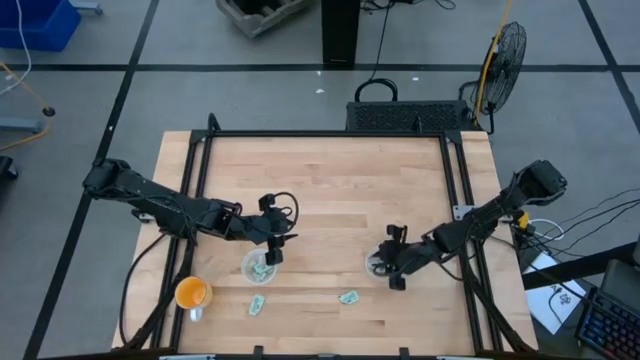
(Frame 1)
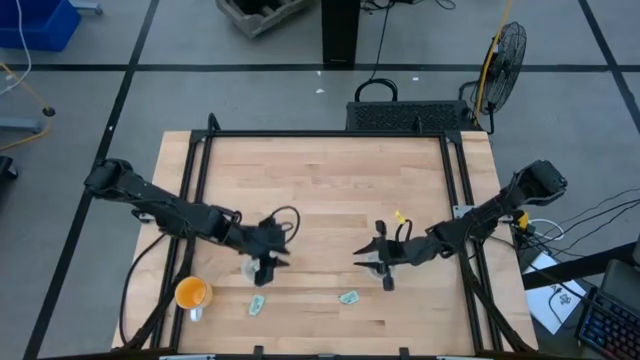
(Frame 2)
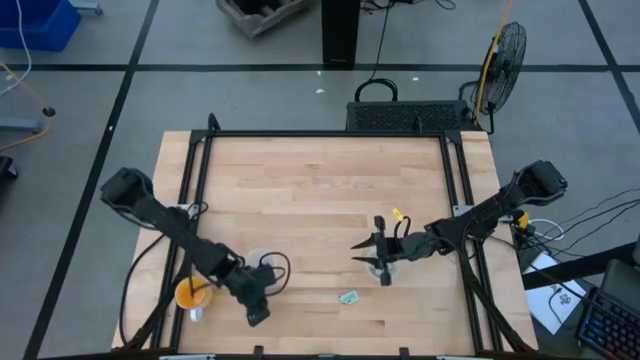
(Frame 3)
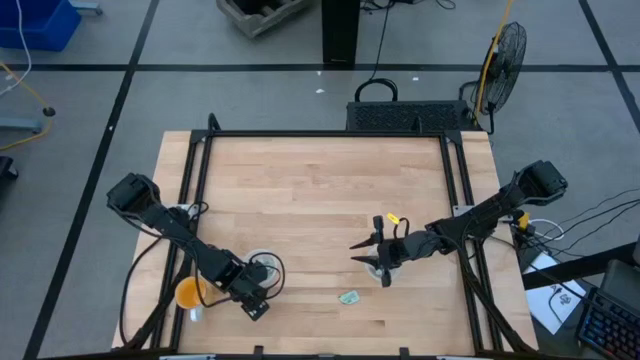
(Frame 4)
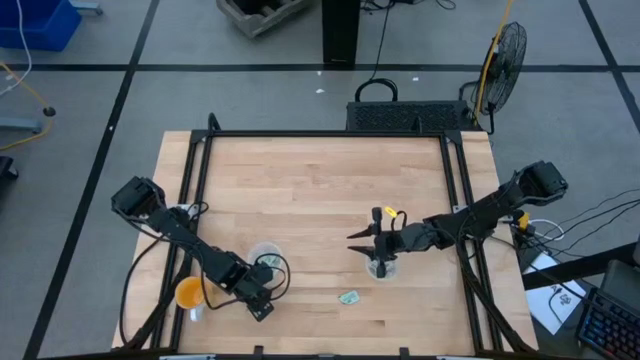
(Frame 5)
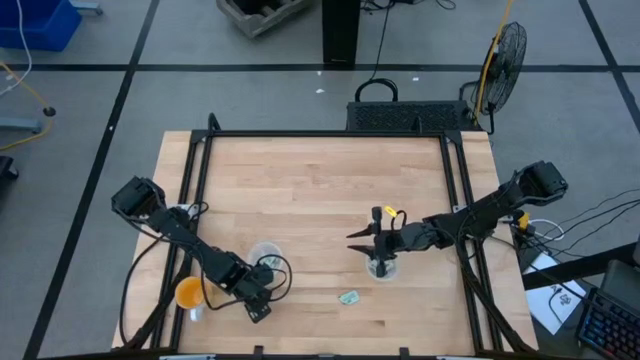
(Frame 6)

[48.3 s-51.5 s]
Task: Pick and place Stevia / Truvia into bins
Put the left light green stevia packet into the left transparent container

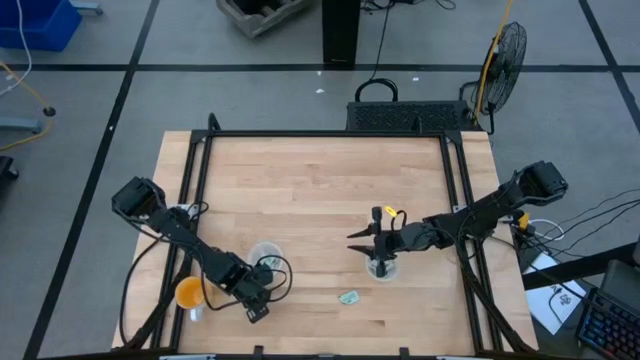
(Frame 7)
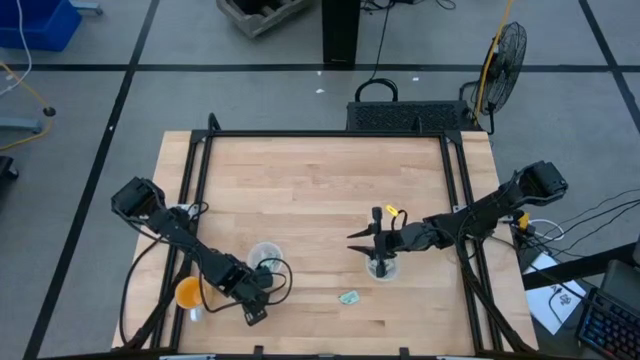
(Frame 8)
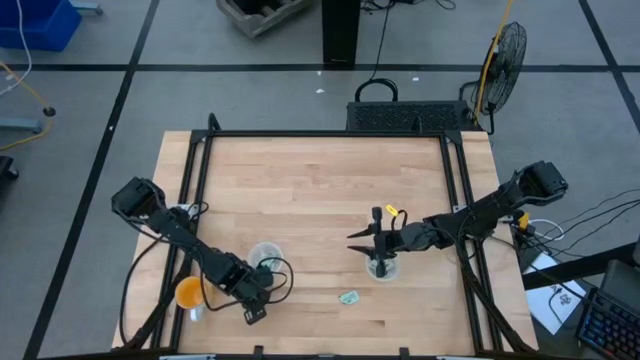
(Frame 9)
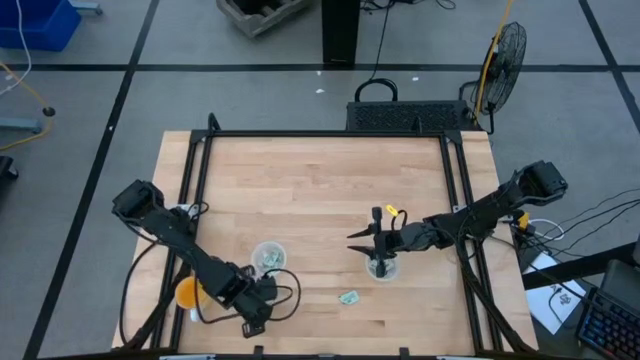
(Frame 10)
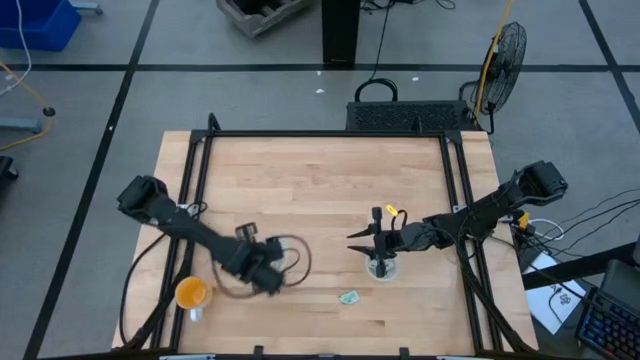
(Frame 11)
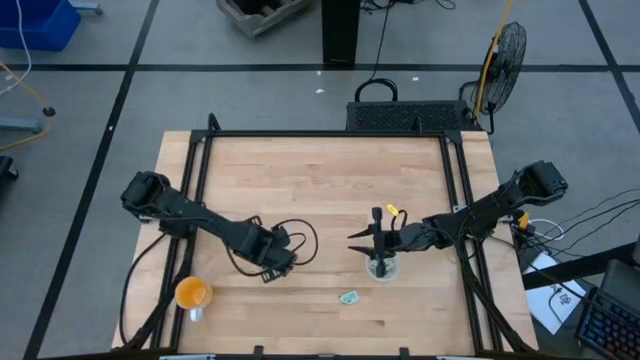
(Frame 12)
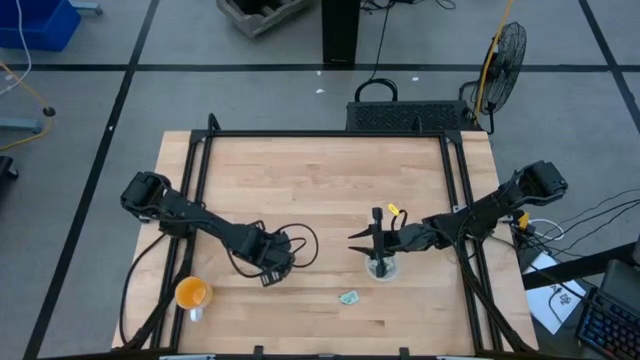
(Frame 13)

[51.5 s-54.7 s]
Put the left light green stevia packet into the left transparent container

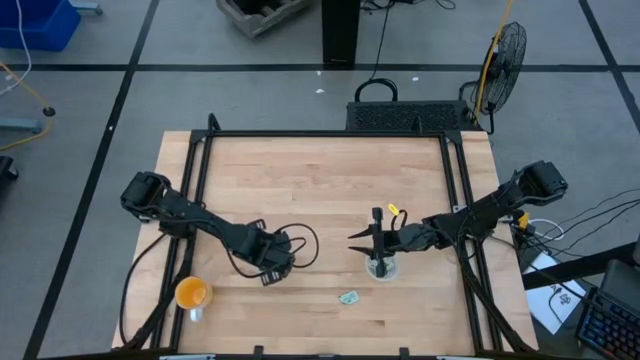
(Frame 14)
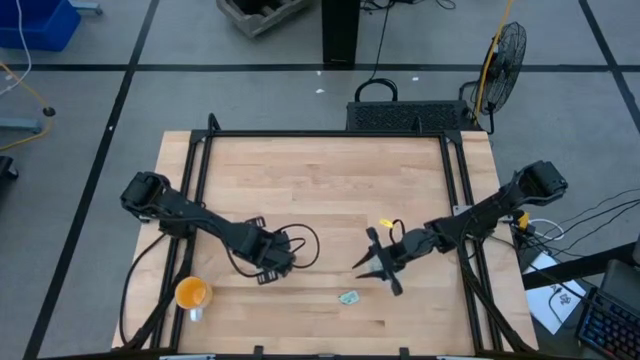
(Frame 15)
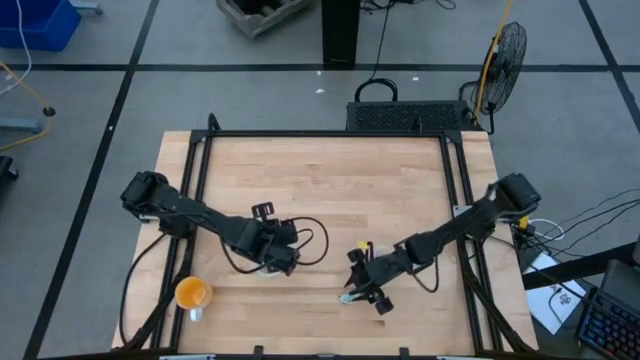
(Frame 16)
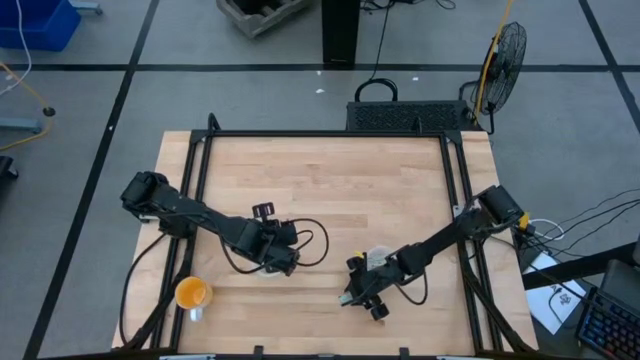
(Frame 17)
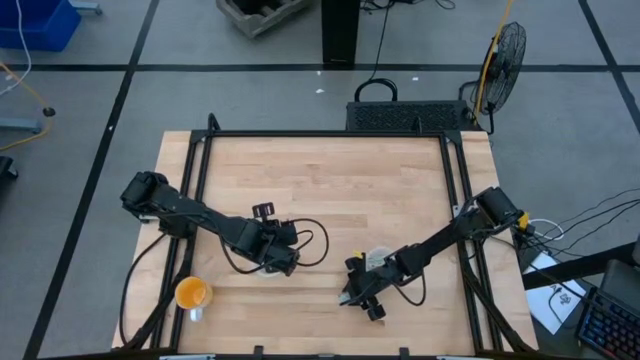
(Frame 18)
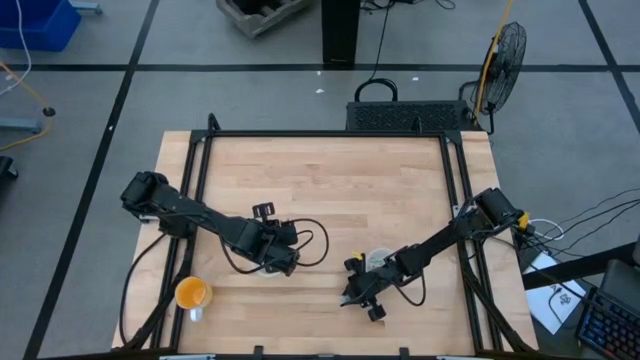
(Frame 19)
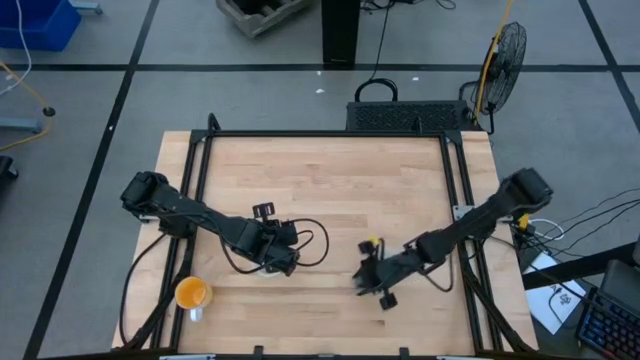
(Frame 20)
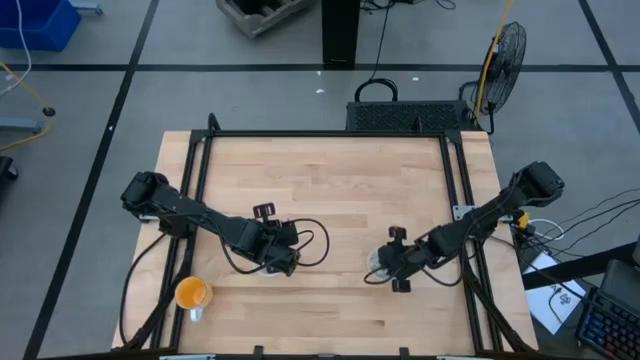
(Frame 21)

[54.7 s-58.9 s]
Put the light green stevia packet into the right transparent container

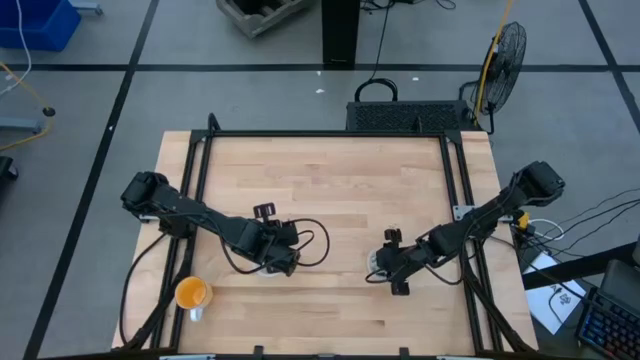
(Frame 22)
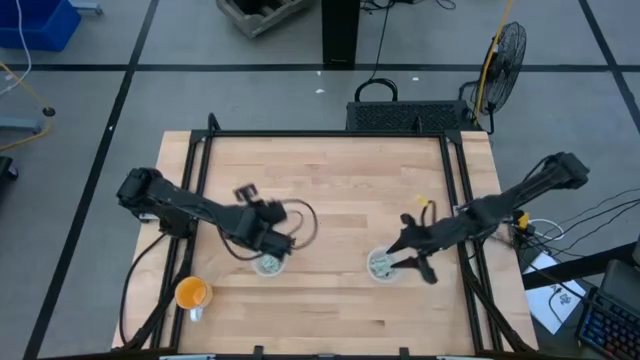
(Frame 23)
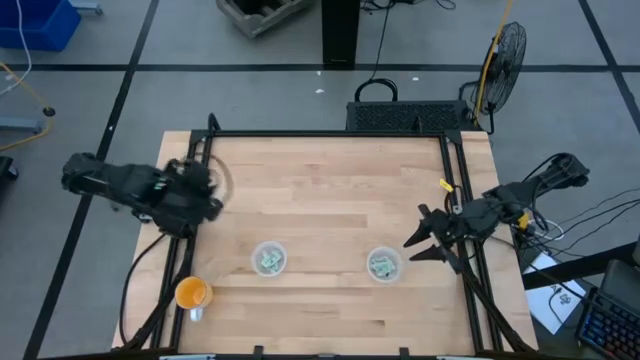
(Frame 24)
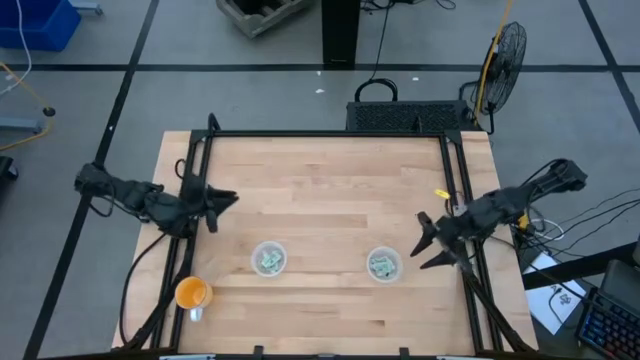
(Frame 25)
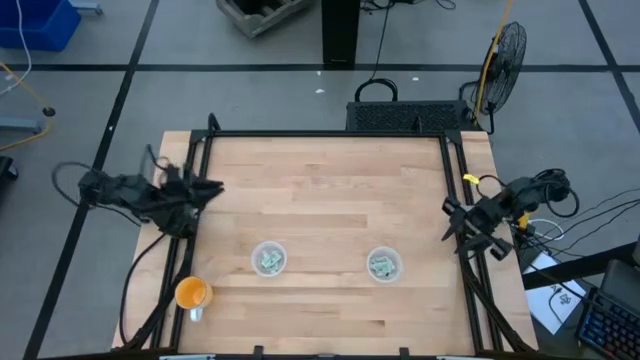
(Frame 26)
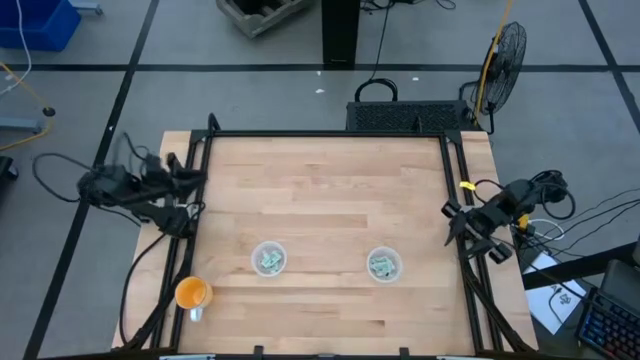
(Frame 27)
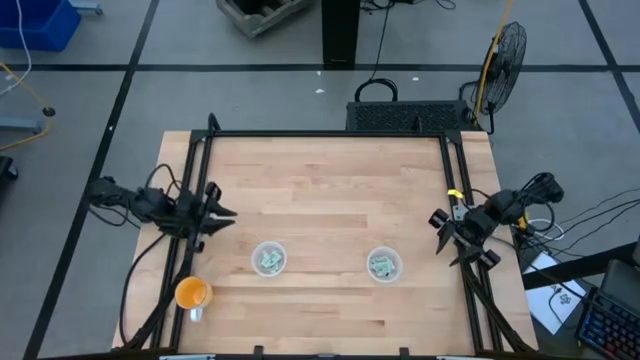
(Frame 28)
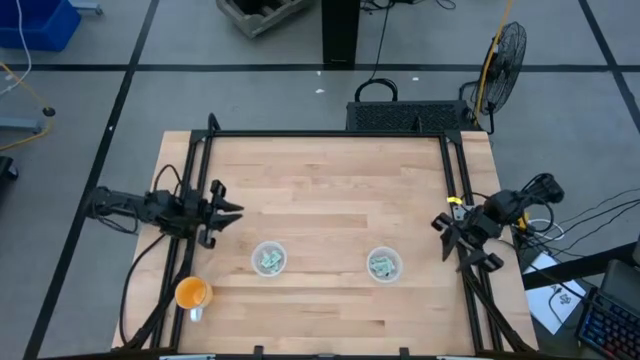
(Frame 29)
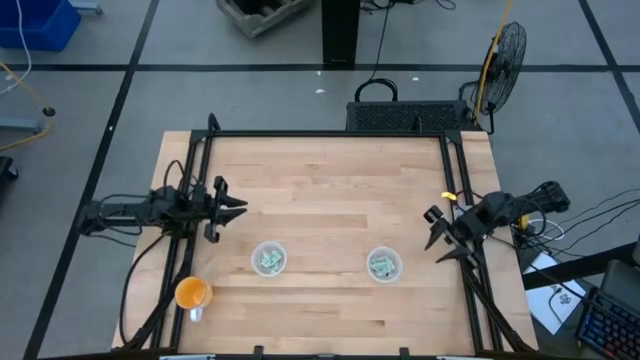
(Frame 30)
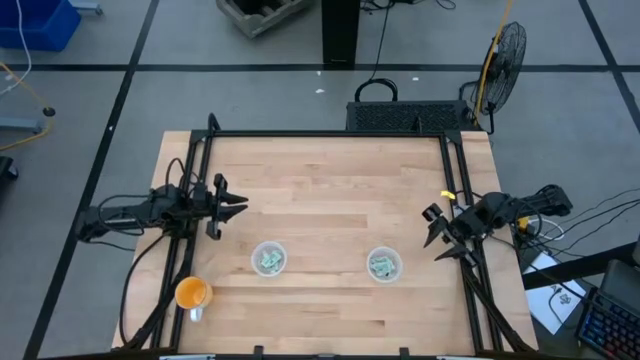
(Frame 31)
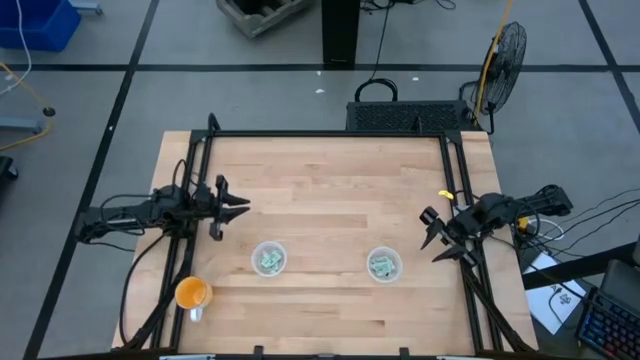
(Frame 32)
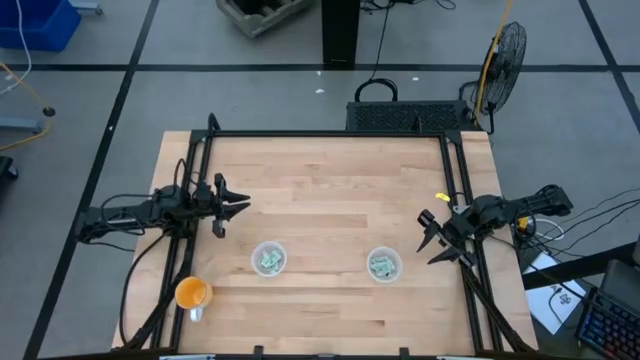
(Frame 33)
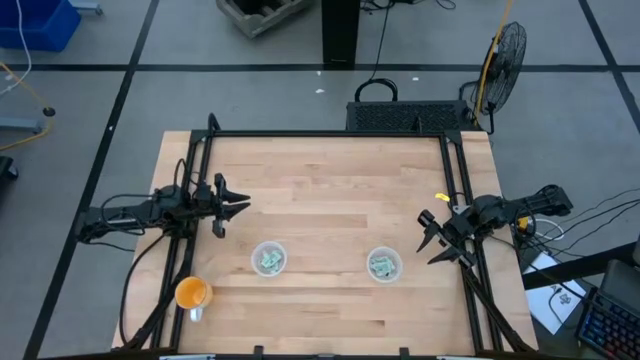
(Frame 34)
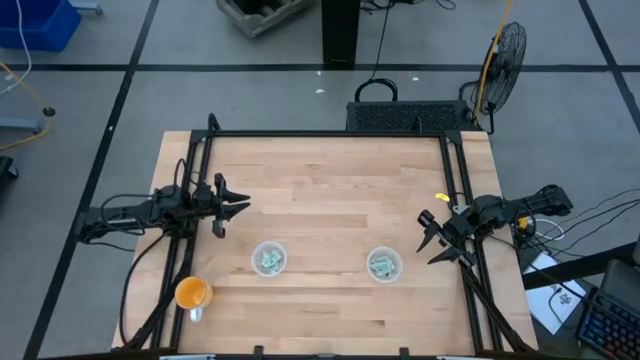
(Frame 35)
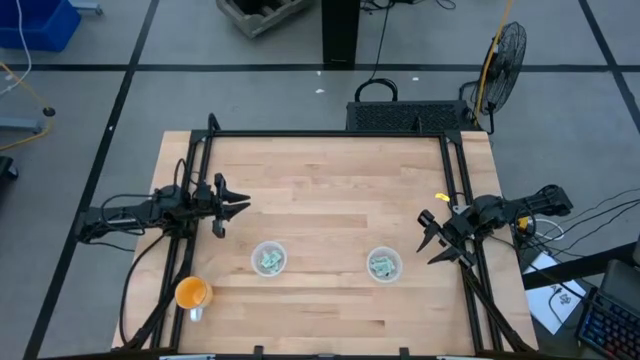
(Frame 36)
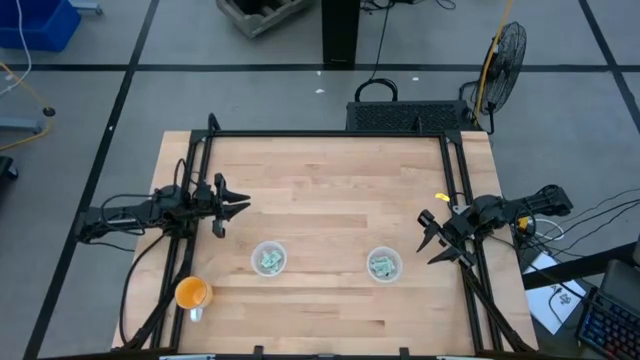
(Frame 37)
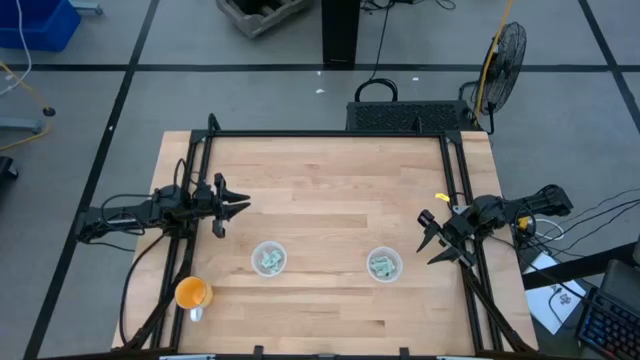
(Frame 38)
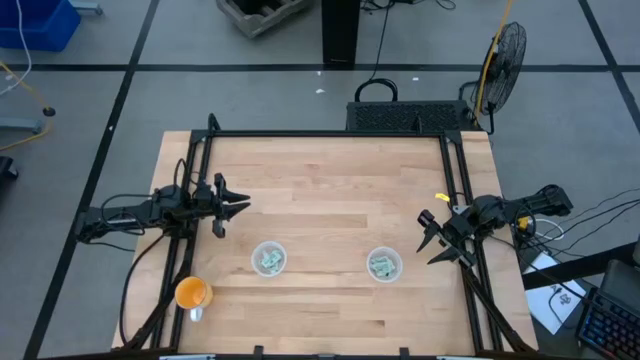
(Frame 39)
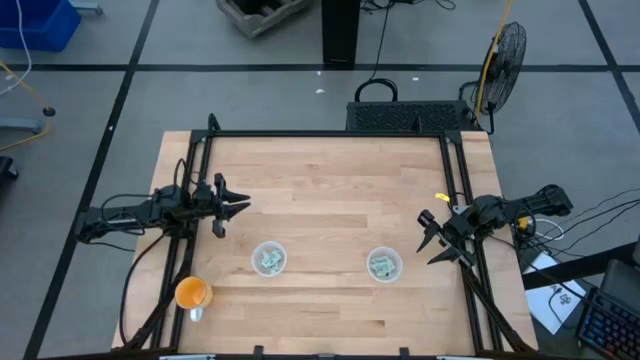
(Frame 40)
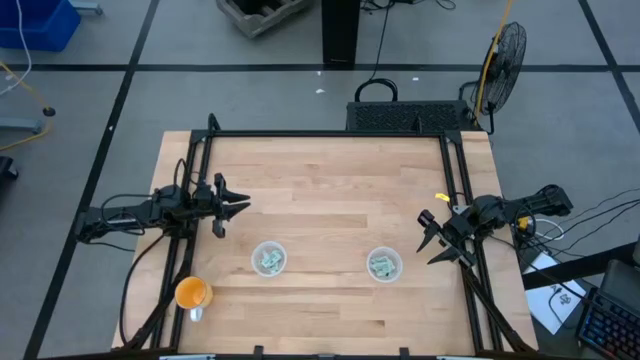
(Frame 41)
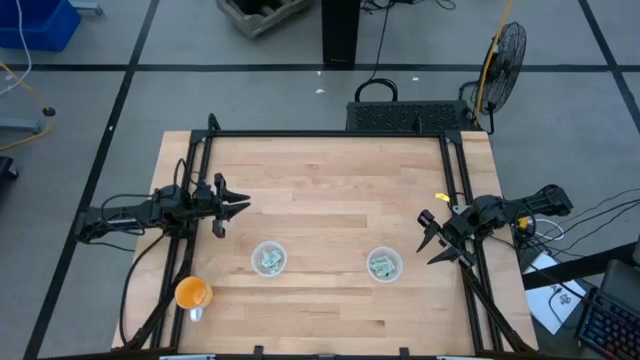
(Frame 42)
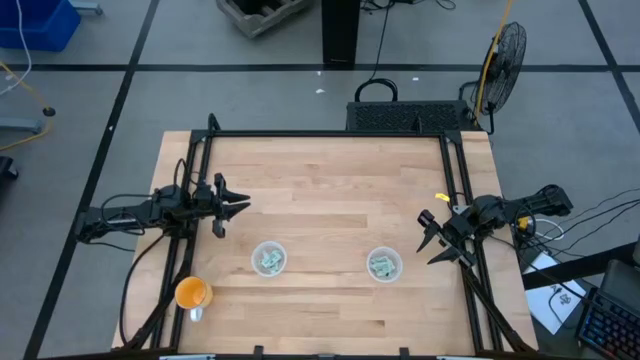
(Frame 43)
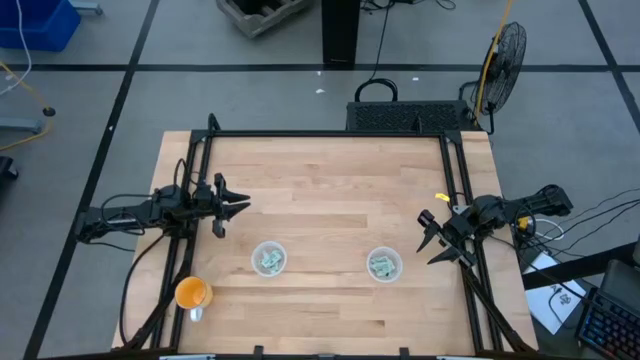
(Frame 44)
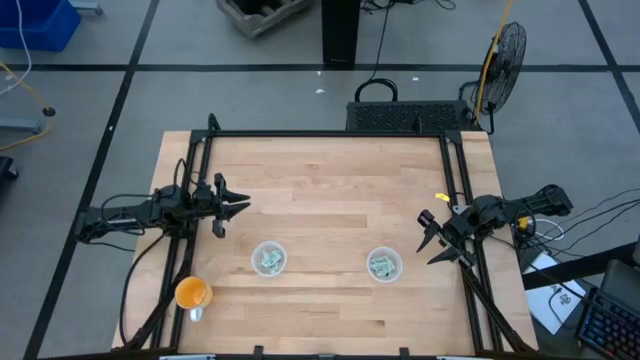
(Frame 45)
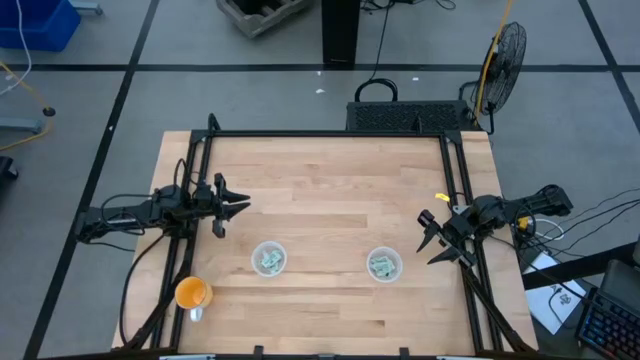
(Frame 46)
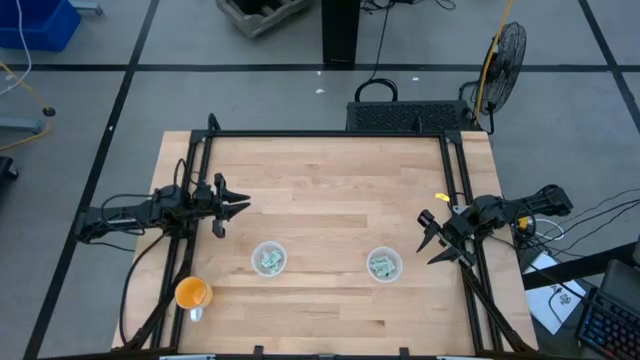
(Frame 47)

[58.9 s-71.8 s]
Return to Home Position
